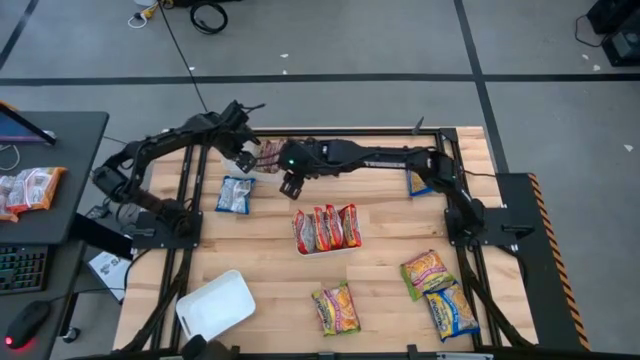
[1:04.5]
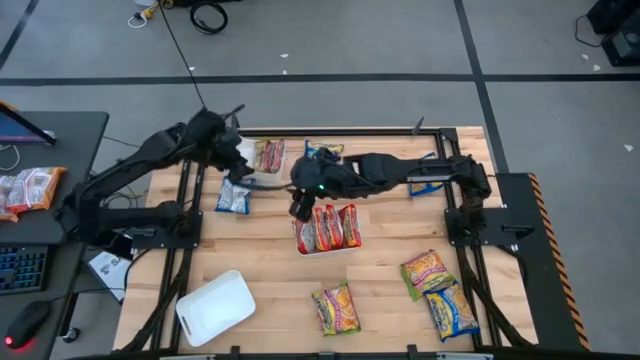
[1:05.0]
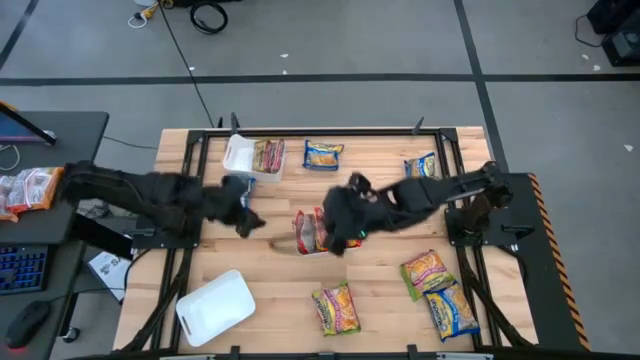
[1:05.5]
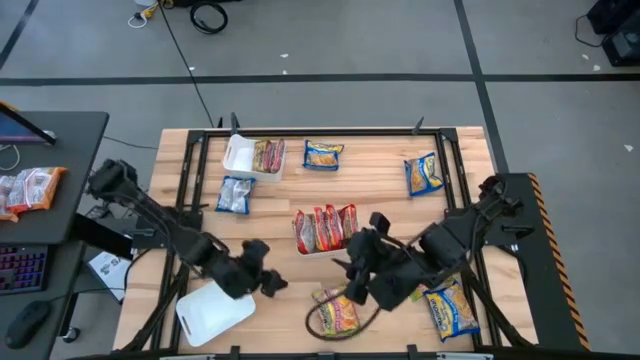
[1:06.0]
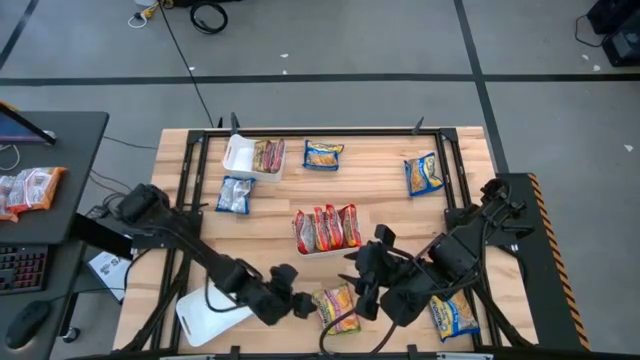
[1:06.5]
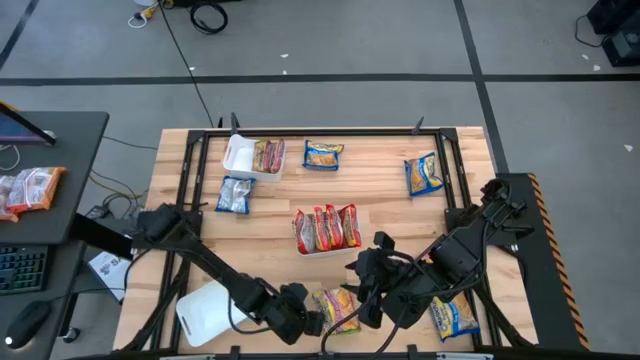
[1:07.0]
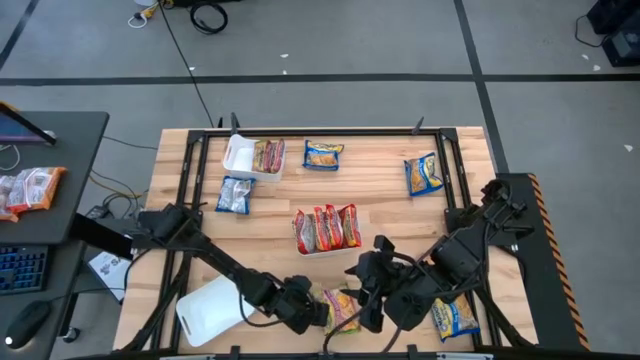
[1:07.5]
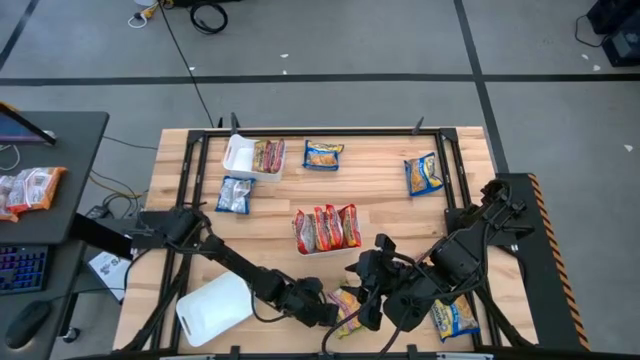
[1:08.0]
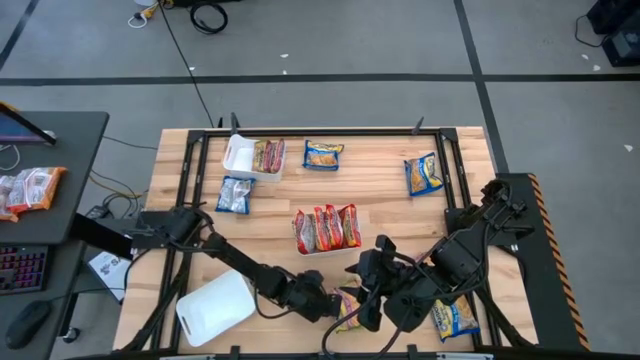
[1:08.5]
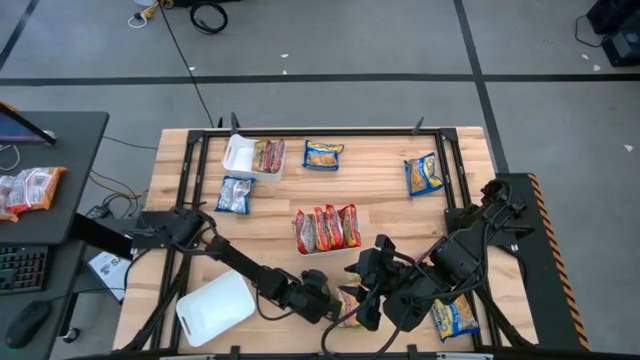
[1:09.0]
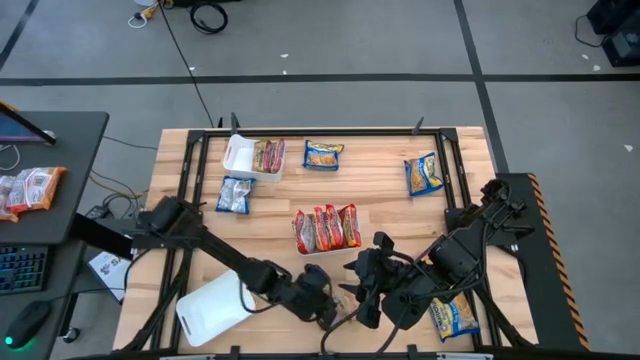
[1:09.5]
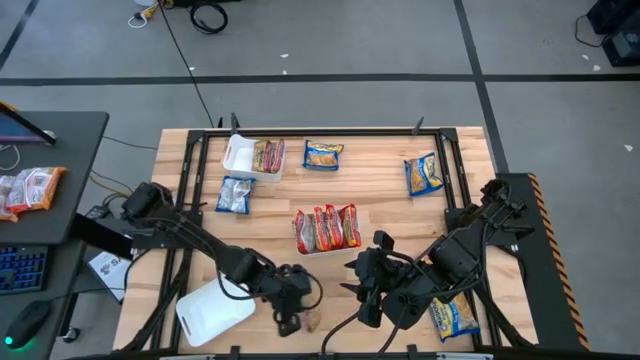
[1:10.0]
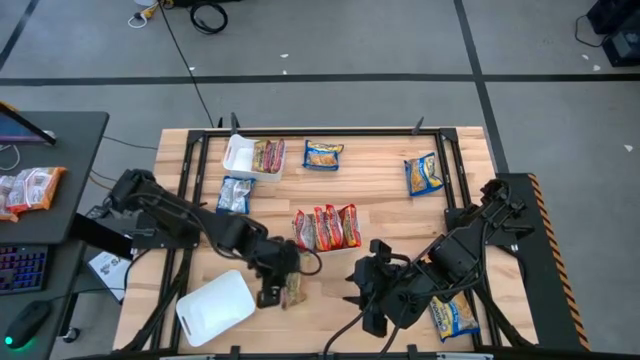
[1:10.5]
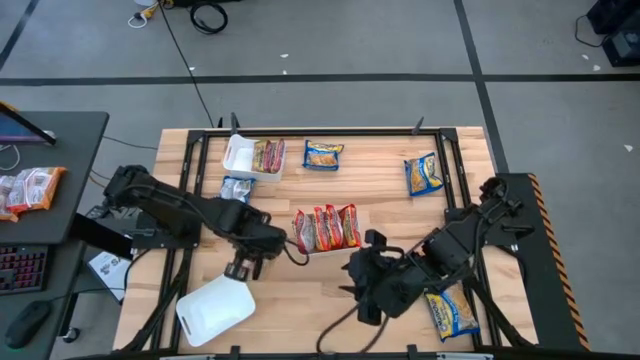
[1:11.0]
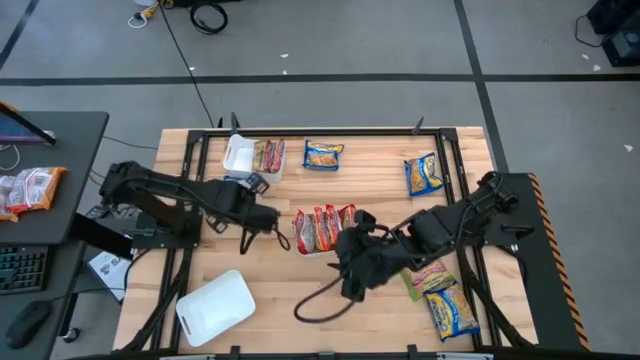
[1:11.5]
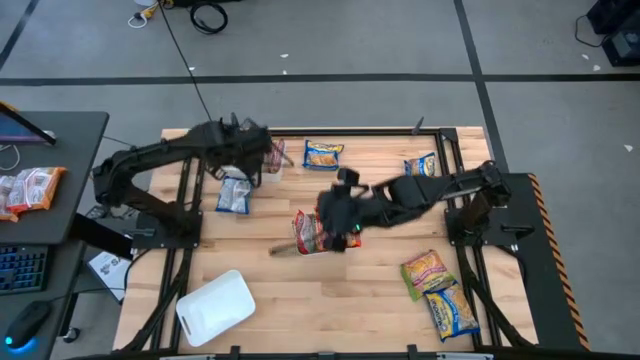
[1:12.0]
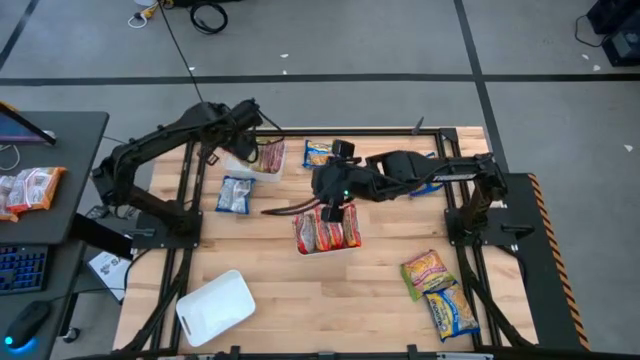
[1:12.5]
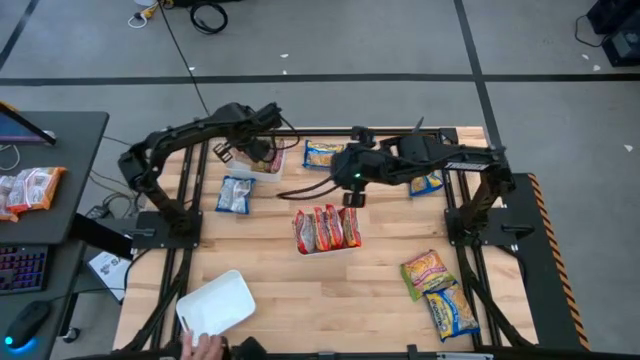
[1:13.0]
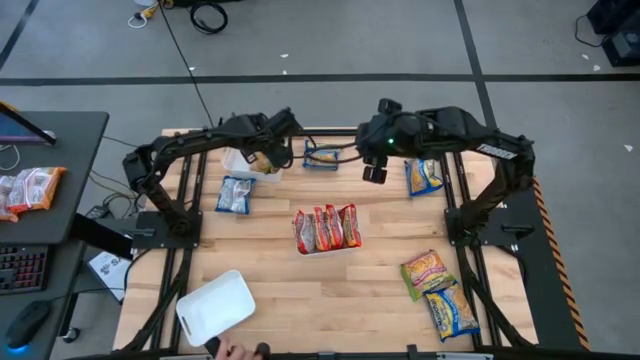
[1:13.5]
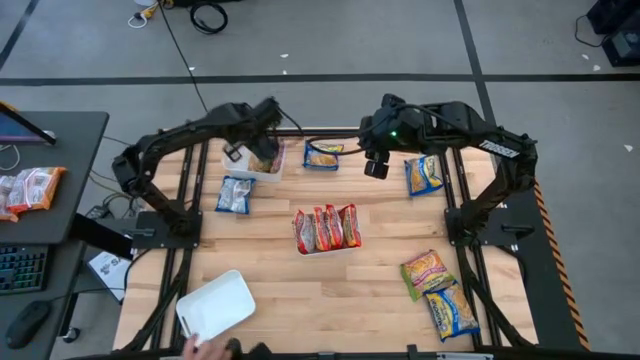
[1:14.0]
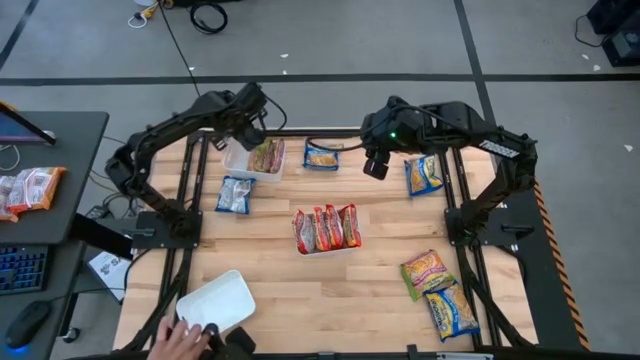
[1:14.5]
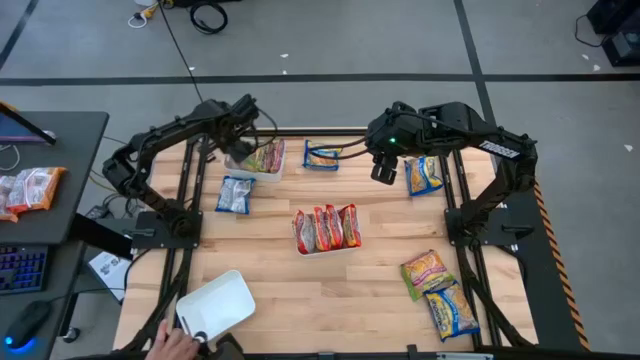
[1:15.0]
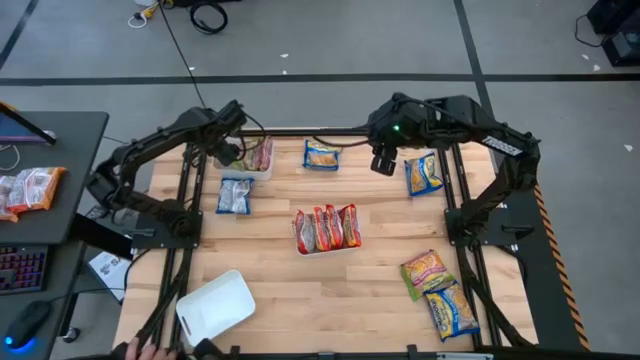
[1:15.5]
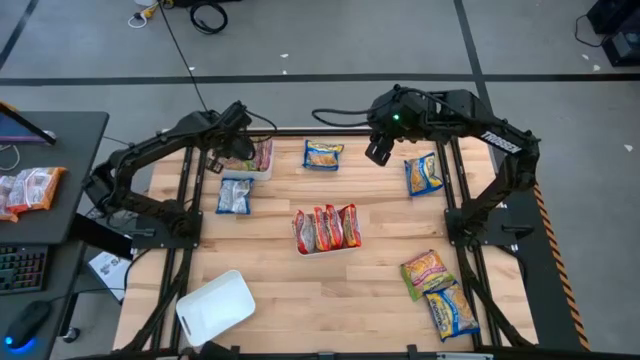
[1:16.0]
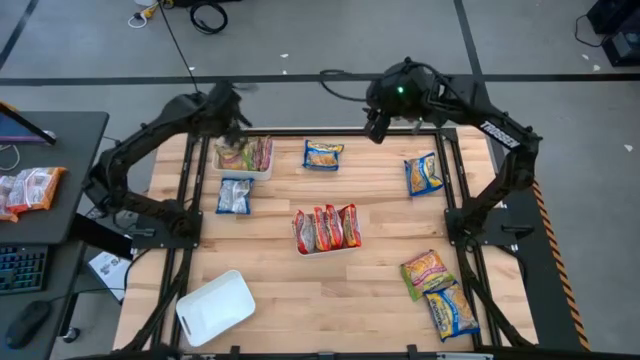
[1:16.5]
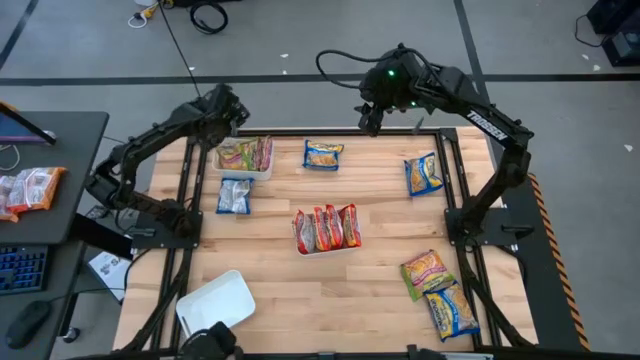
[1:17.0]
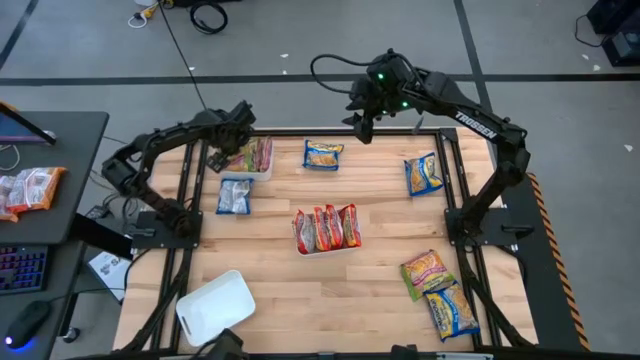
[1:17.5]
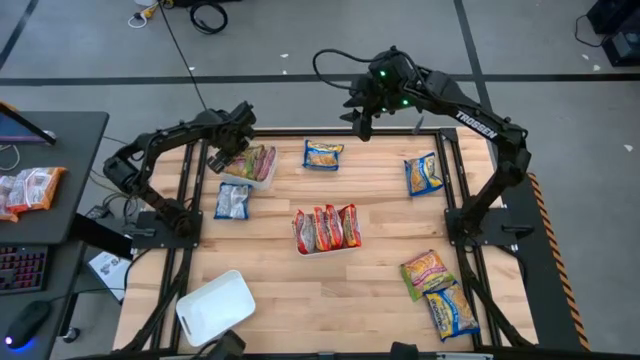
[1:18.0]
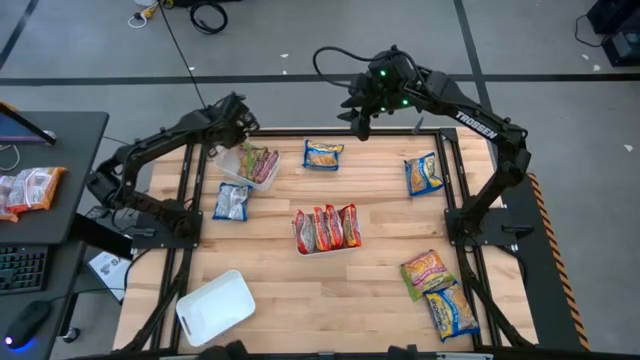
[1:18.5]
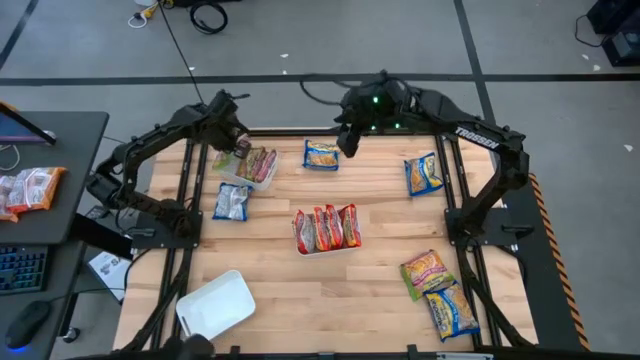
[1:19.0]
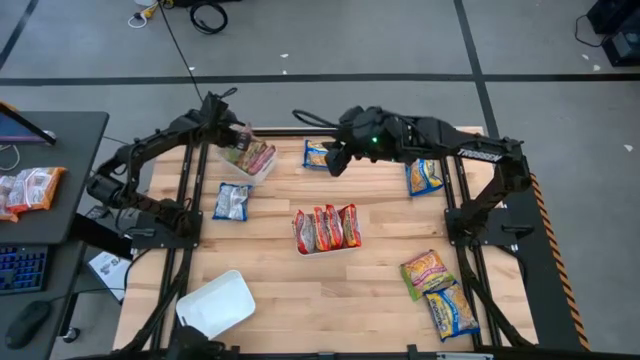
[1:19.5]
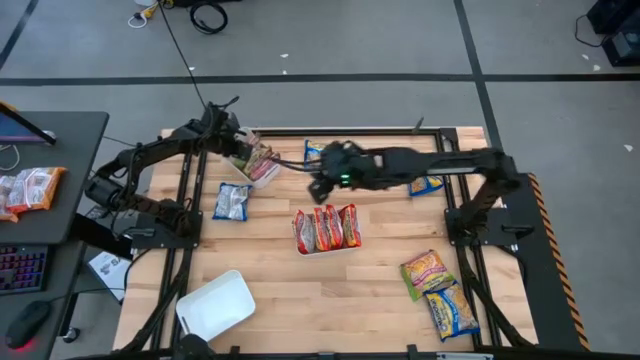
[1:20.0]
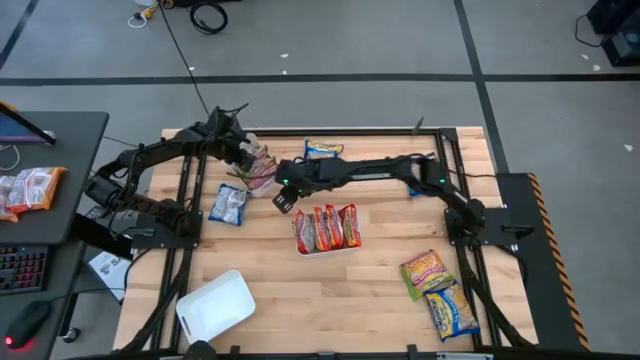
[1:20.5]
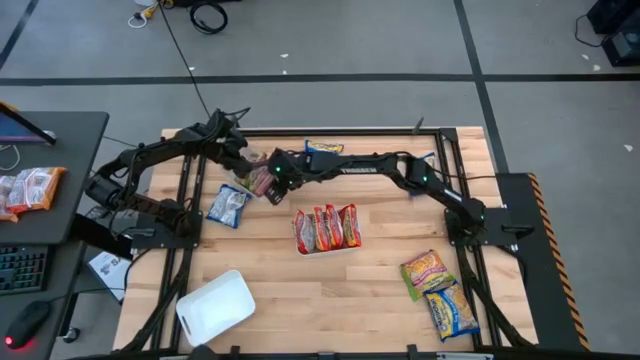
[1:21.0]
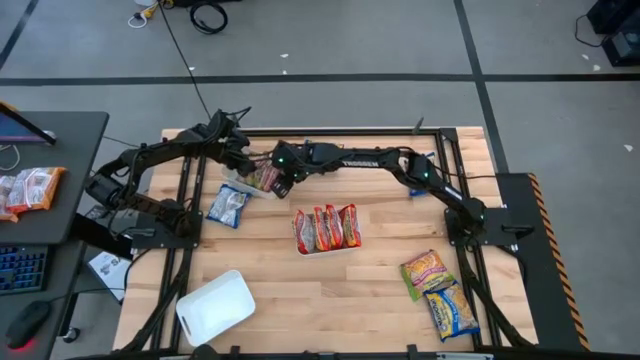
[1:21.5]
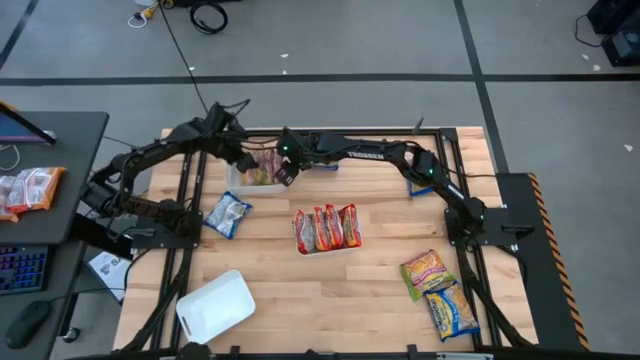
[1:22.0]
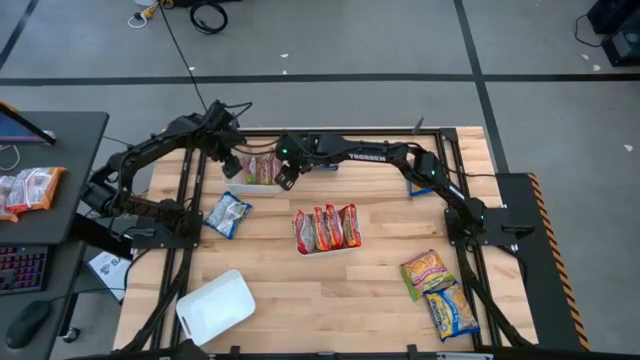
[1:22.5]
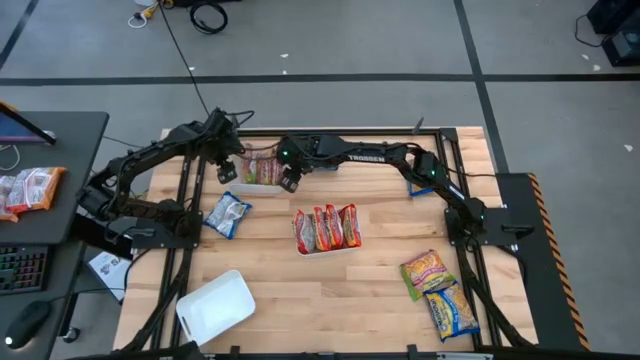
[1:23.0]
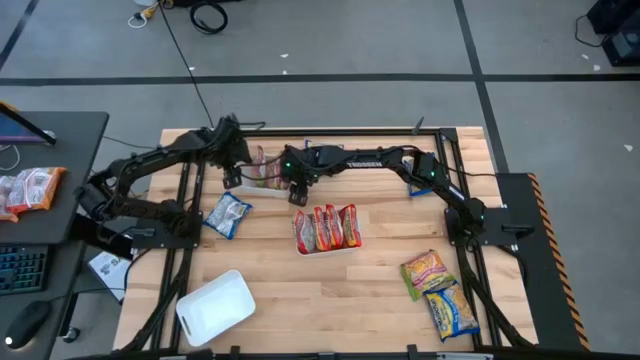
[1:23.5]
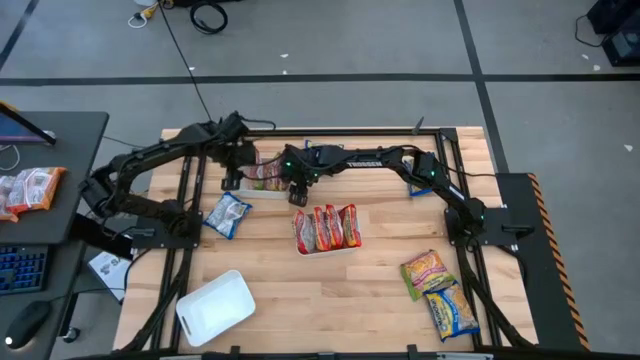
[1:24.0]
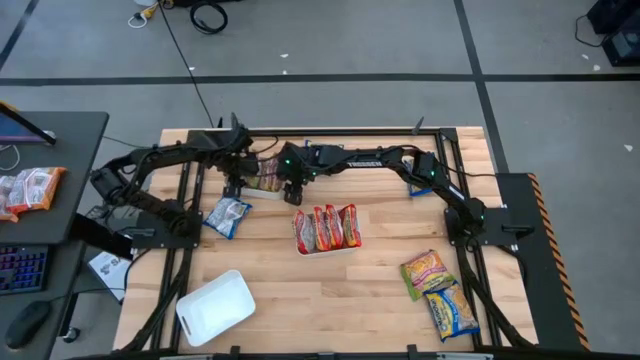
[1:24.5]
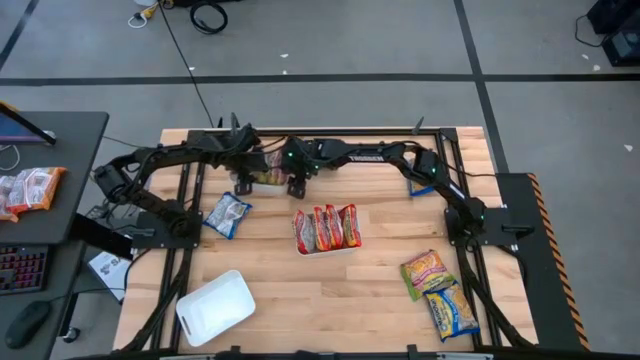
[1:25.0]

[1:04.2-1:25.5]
Task: Sort Maruchan noodles
Put the green noodle pack into the top white bin
